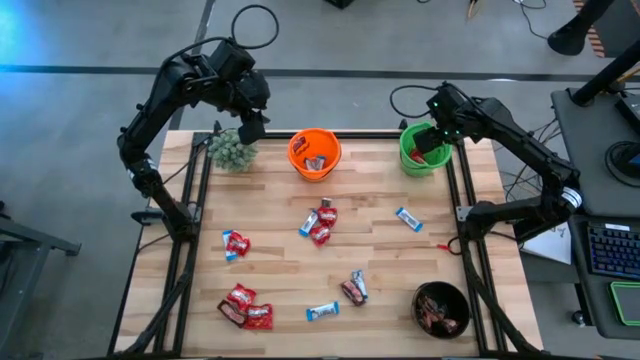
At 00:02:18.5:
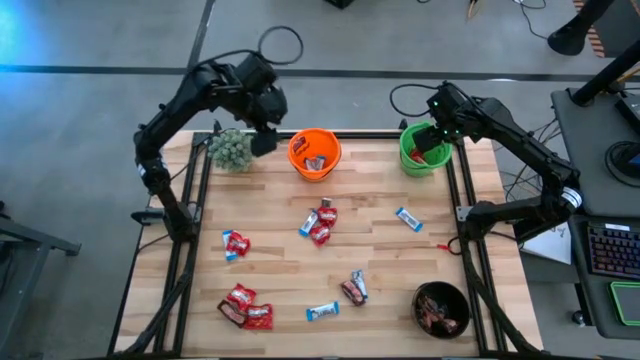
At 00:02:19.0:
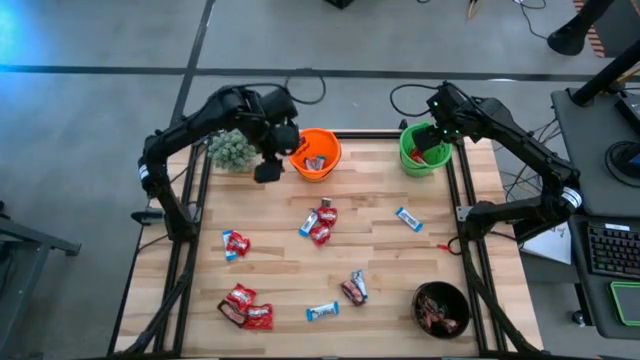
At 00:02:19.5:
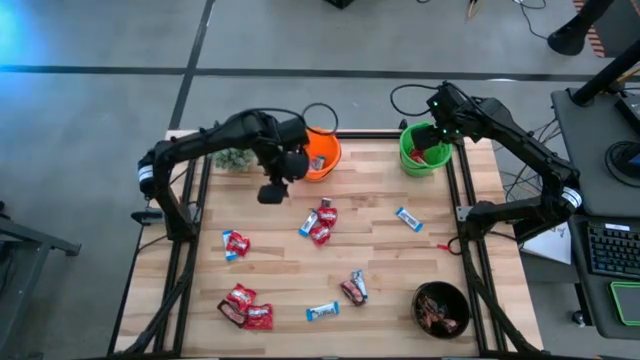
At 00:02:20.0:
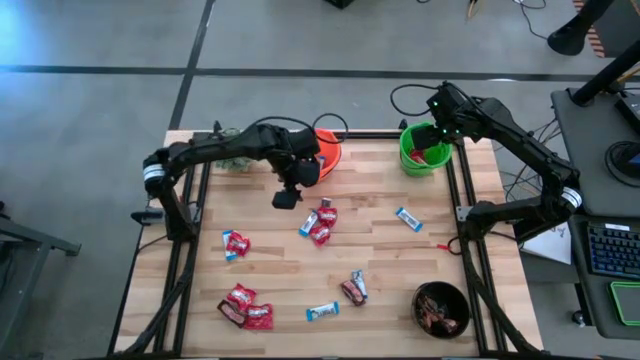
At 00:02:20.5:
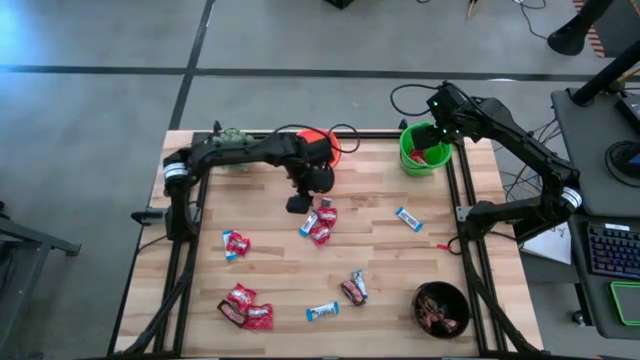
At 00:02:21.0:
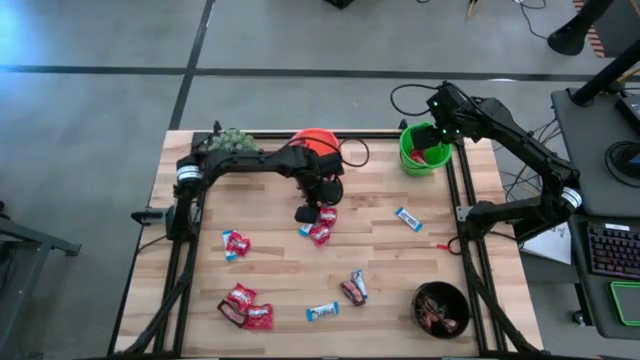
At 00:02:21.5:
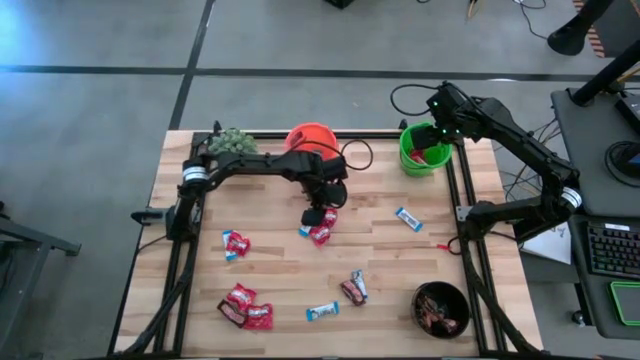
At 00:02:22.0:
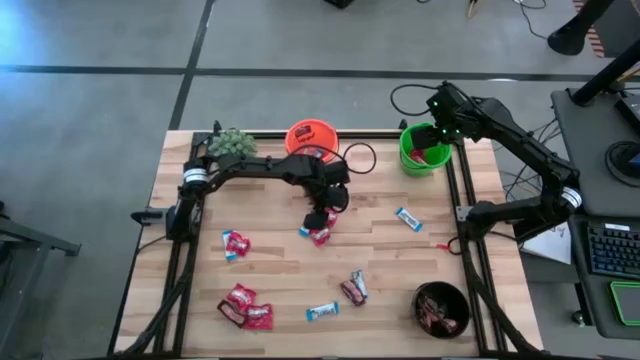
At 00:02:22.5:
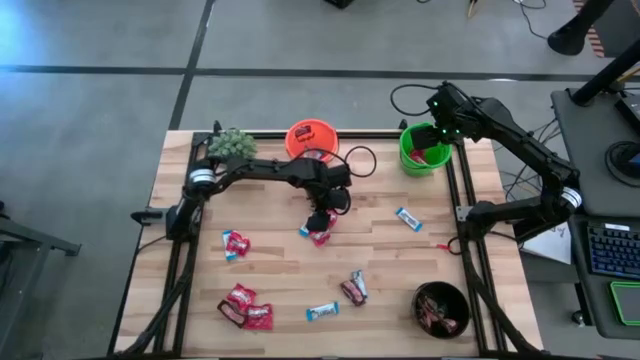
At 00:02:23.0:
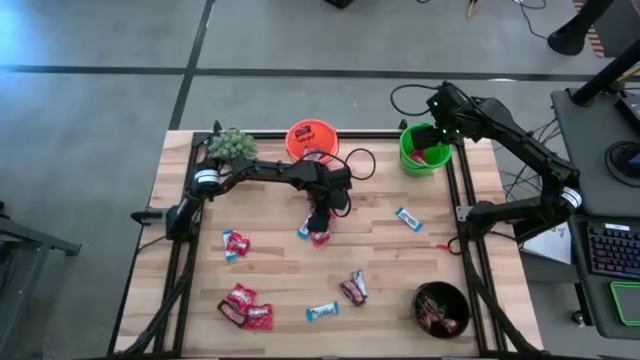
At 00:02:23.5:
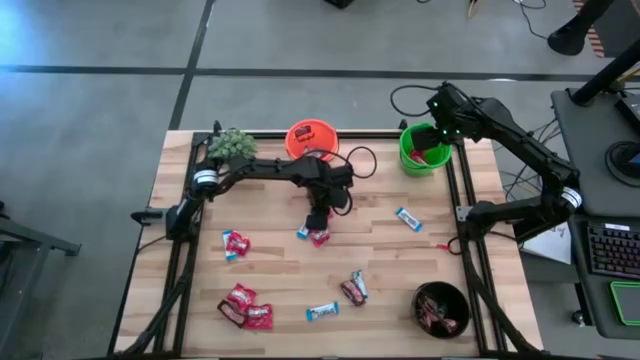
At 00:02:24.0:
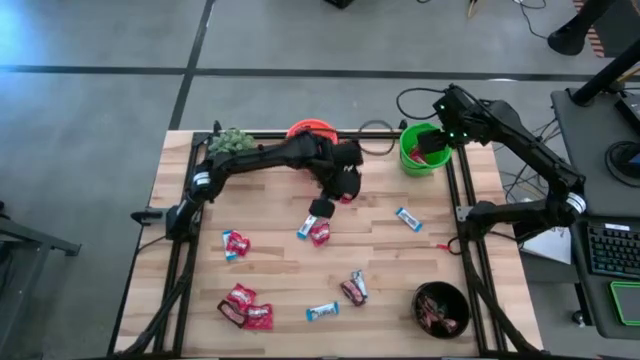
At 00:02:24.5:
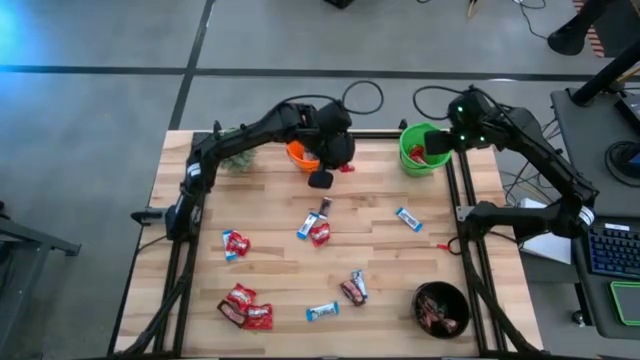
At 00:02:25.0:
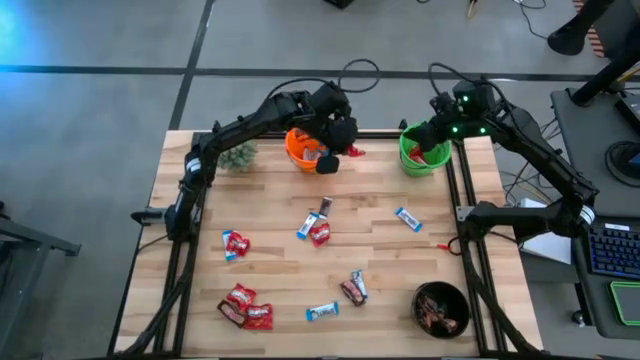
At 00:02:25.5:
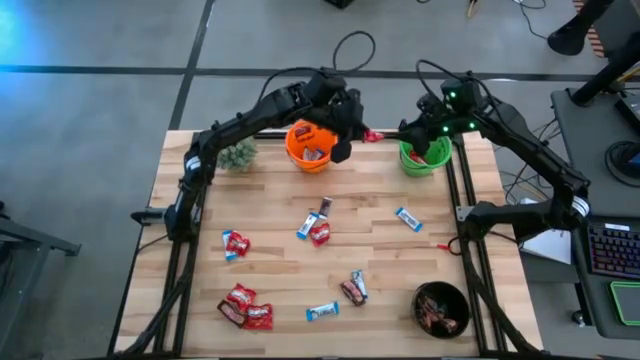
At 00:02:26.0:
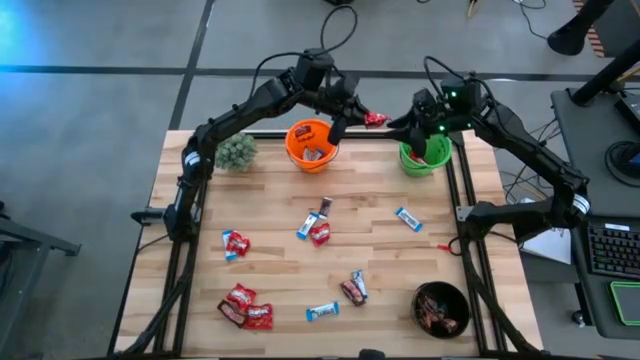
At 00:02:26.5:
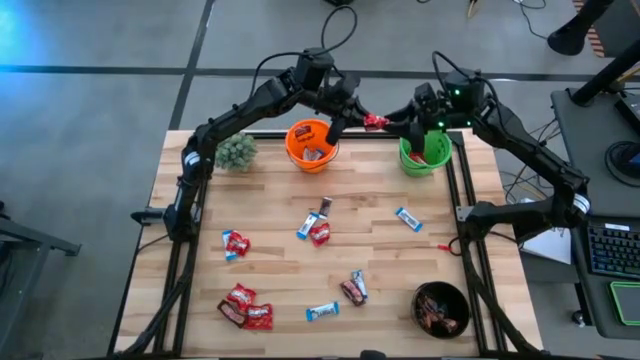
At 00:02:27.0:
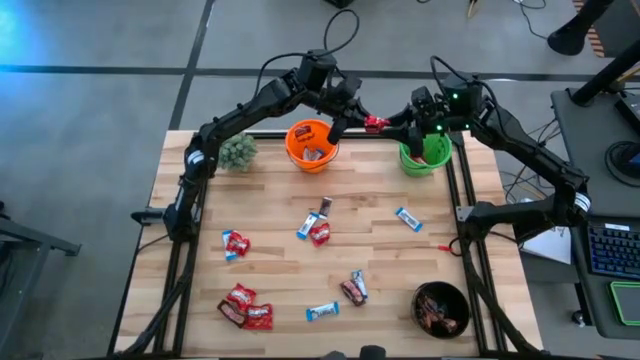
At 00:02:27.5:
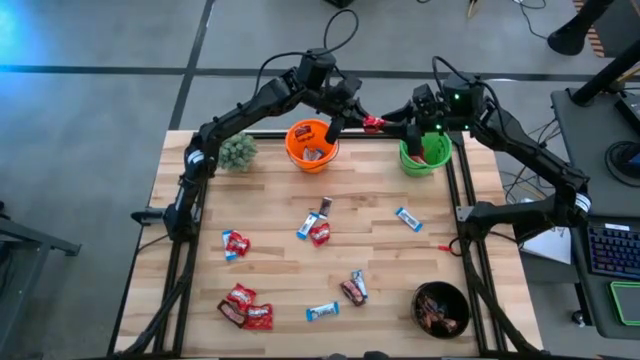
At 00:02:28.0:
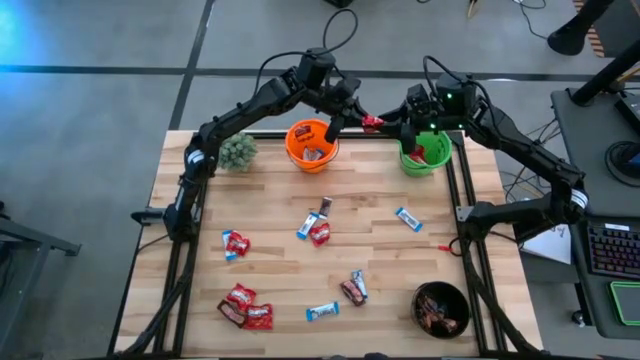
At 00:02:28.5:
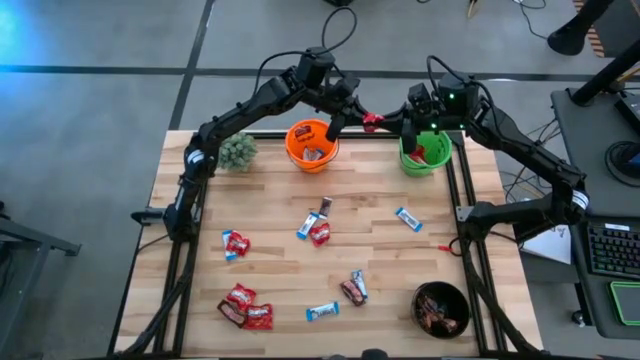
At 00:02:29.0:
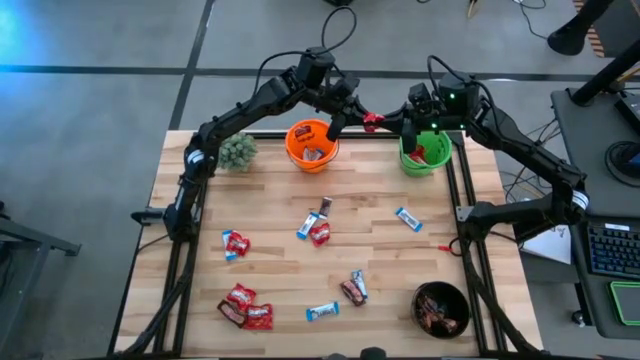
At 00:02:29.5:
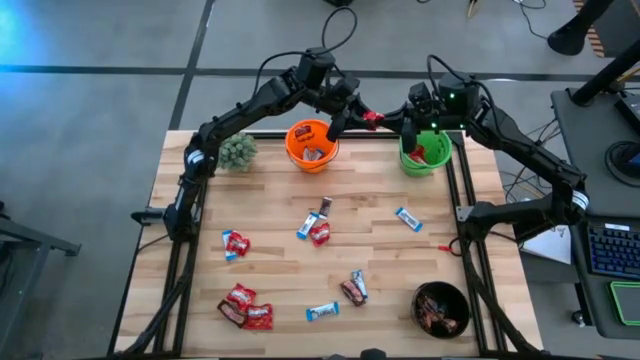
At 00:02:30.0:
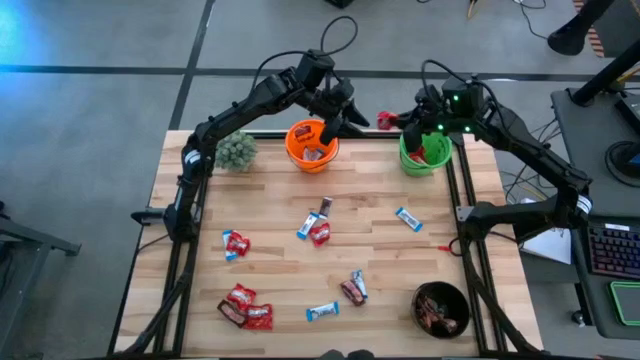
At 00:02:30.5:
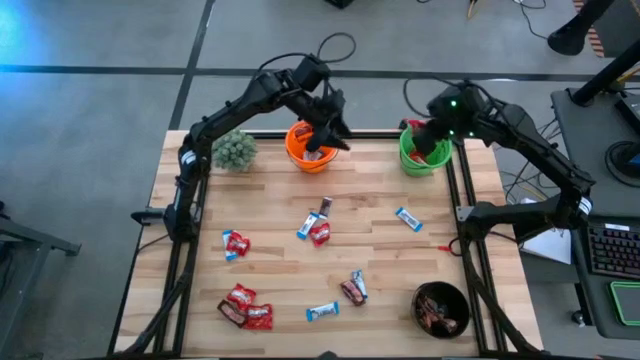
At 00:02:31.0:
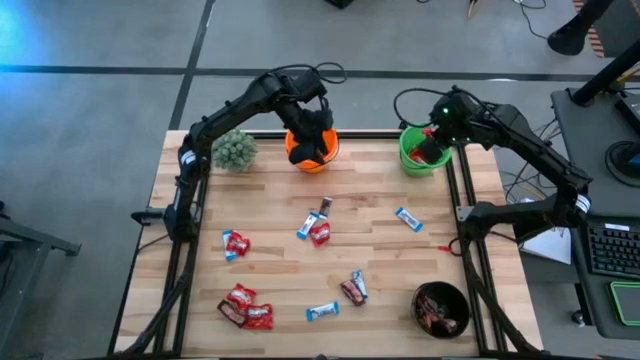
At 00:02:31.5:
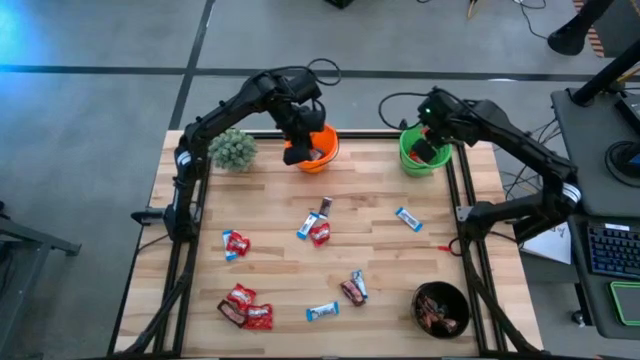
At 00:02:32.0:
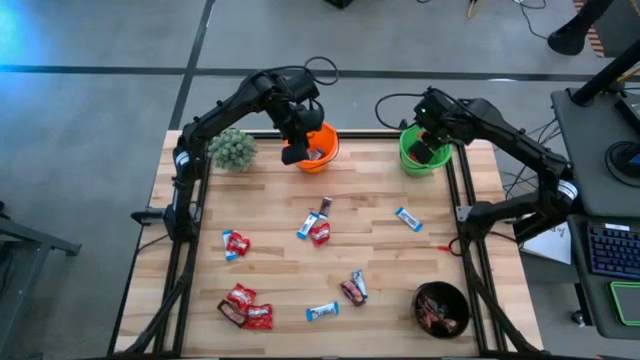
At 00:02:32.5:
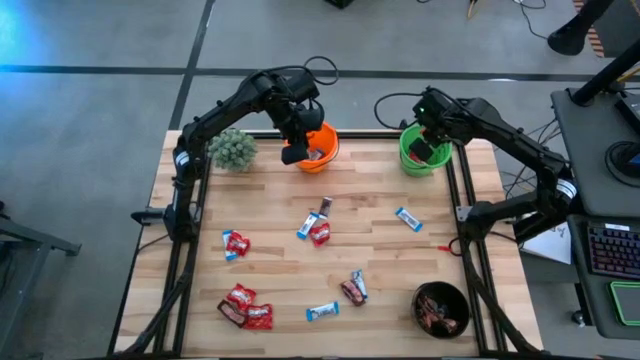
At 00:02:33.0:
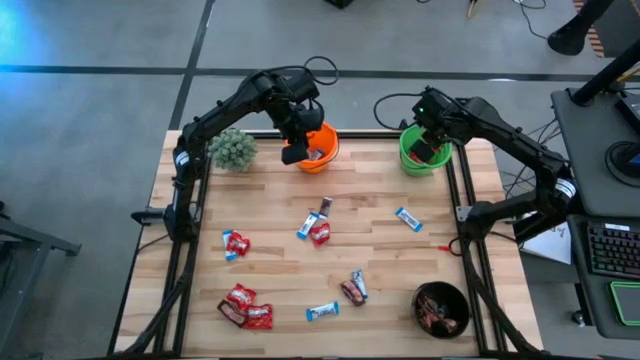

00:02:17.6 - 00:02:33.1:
Task: Sort candy
Put the red candy into the green bucket

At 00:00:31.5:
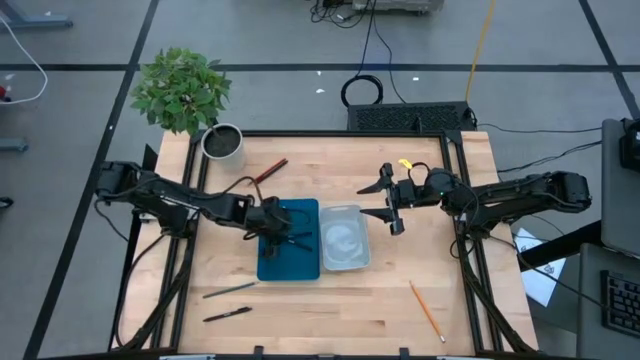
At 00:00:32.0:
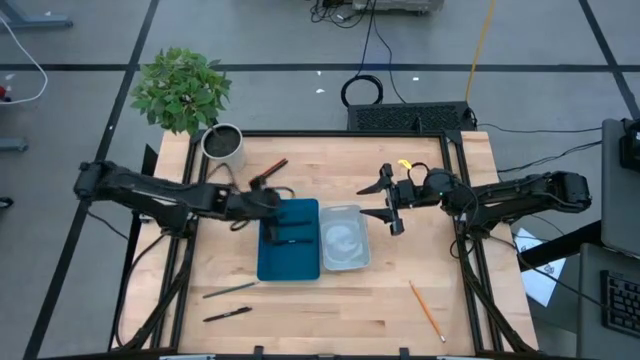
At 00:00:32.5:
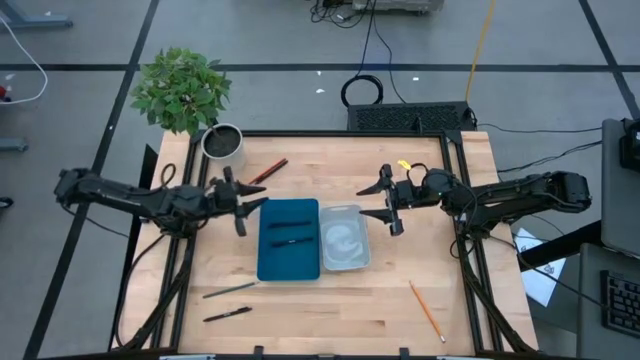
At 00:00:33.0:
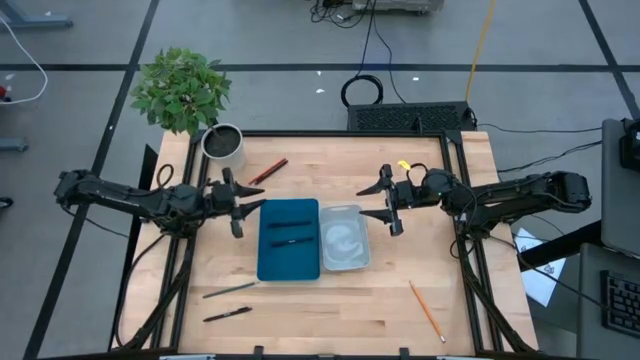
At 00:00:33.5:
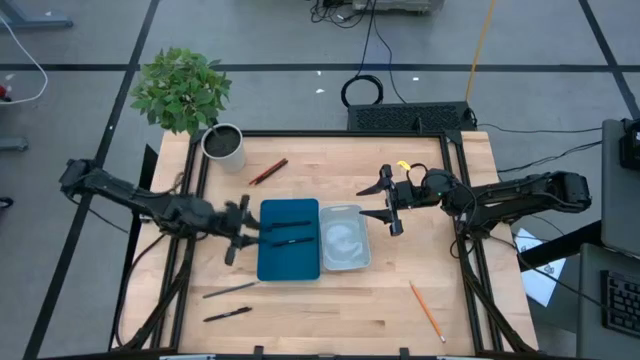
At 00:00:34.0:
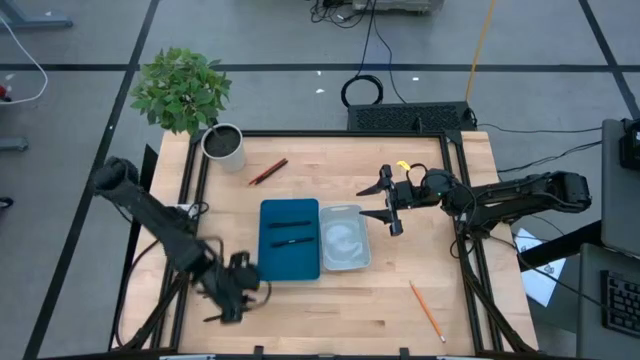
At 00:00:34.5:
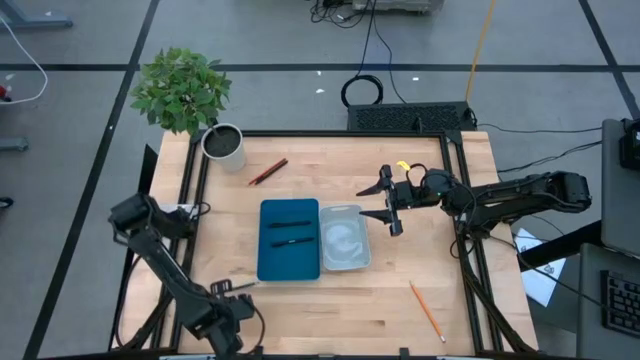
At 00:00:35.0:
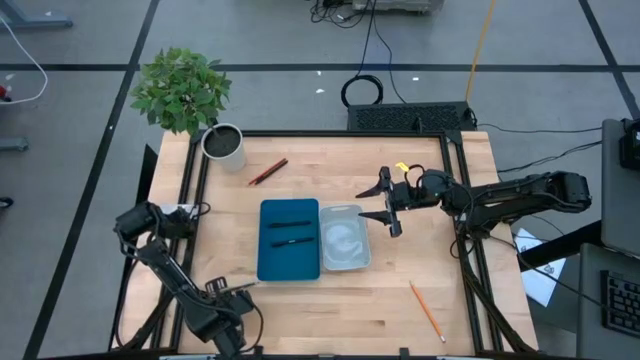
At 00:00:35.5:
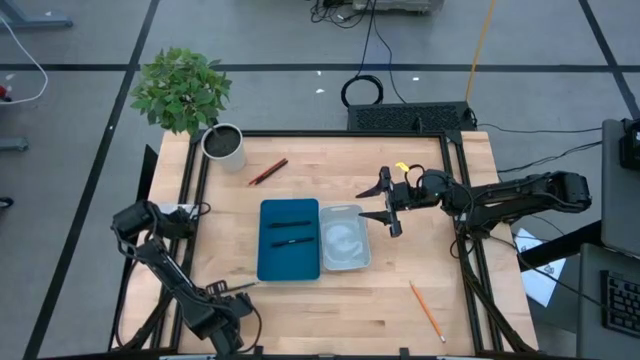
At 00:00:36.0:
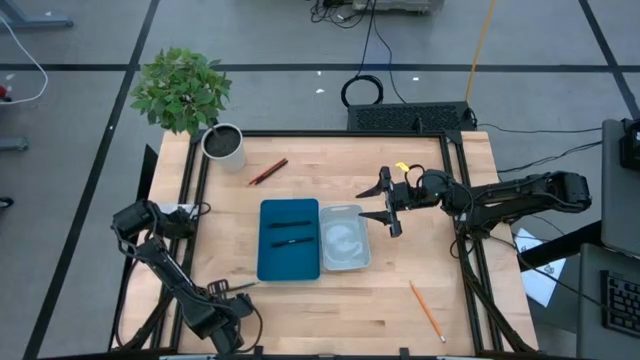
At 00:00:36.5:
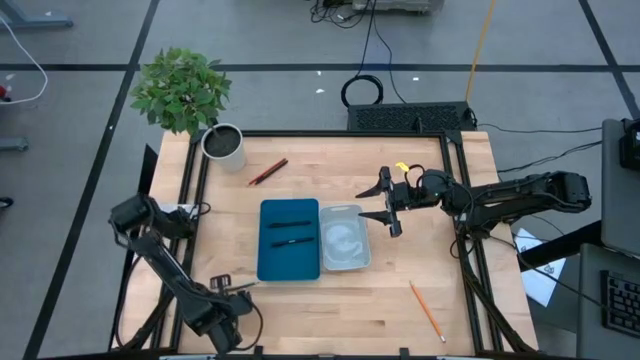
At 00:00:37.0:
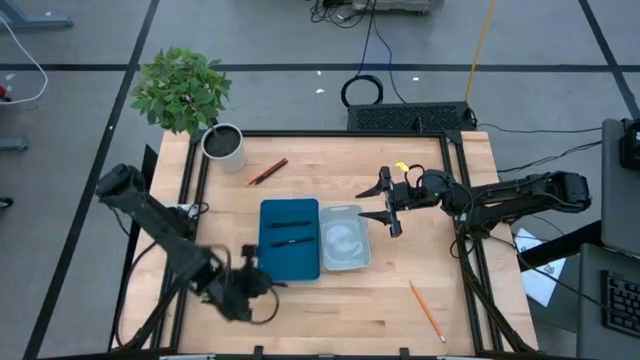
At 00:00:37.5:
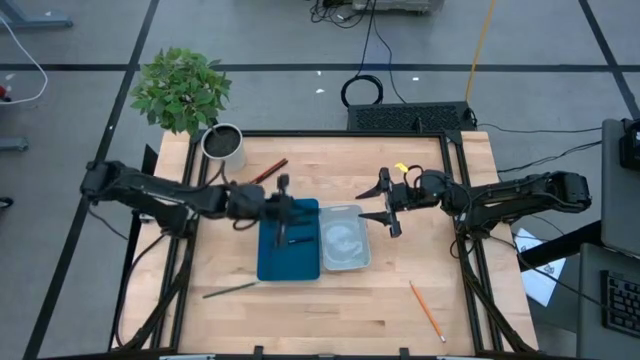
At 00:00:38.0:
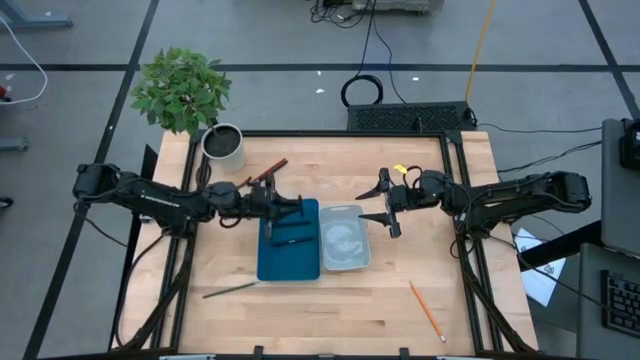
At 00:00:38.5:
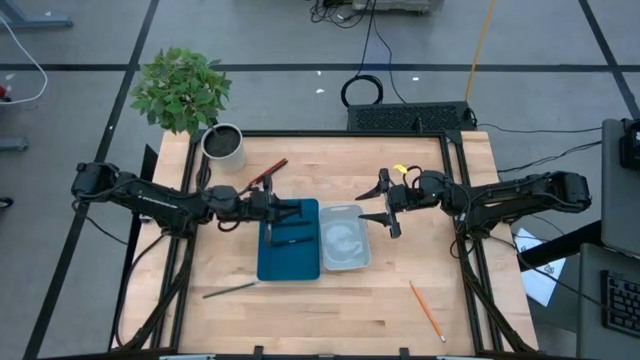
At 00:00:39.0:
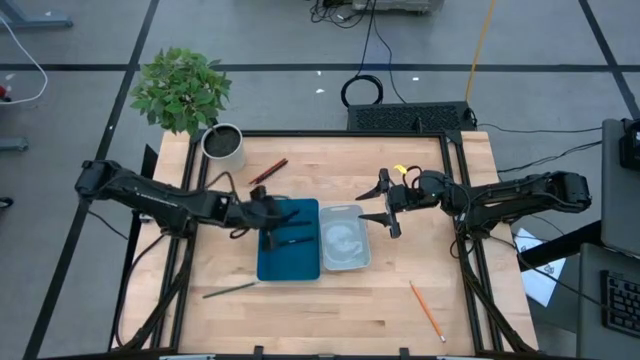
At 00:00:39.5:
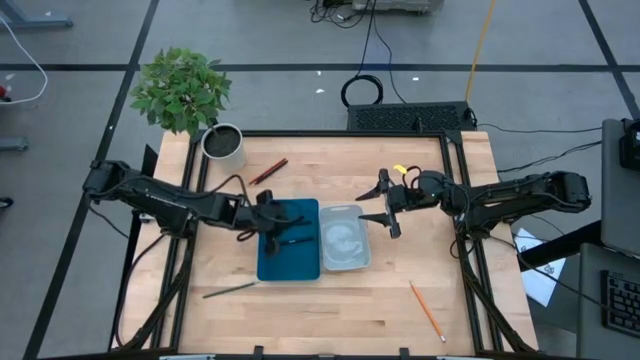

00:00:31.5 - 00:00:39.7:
Task: Sort pens & pencils
Put the bottom black pen into the blue bin
